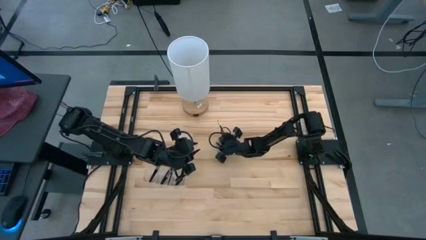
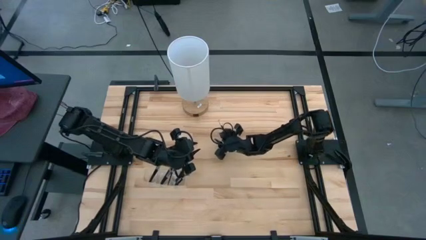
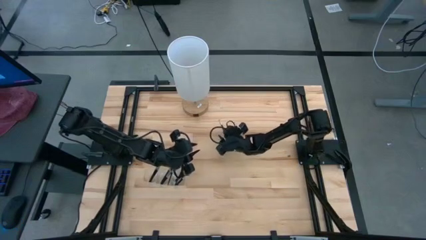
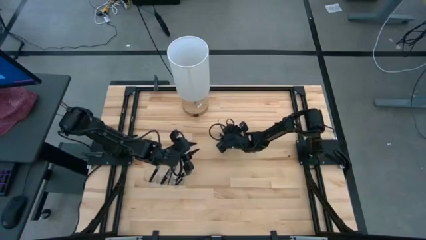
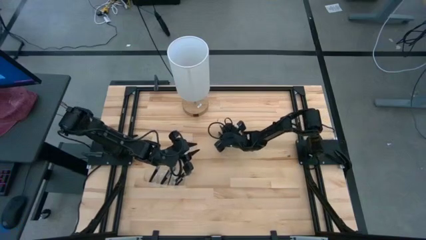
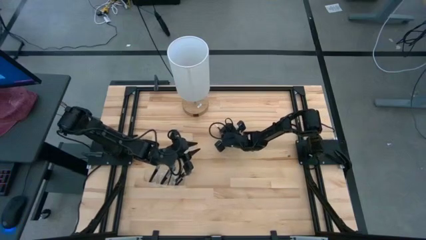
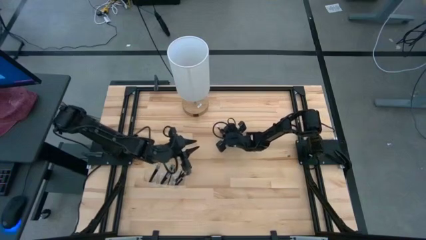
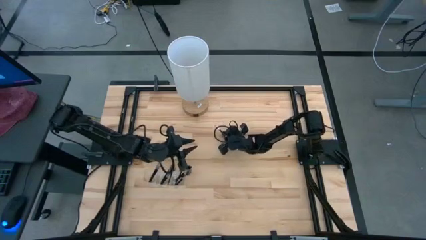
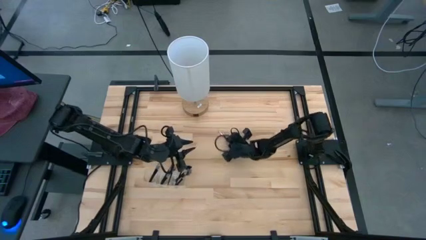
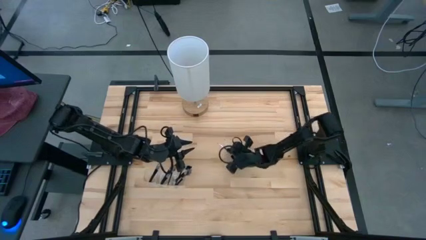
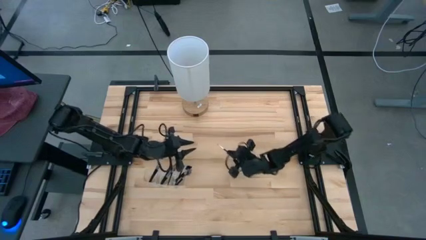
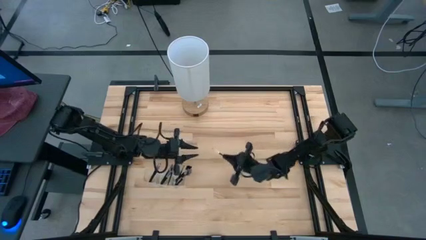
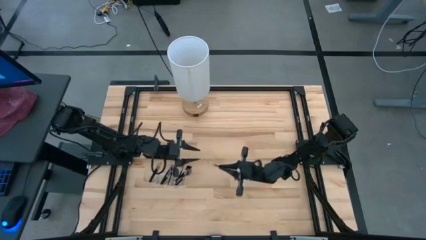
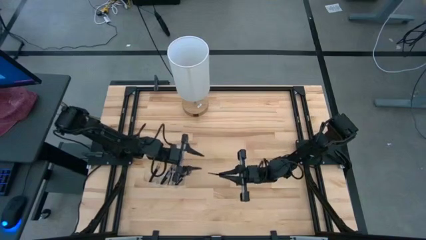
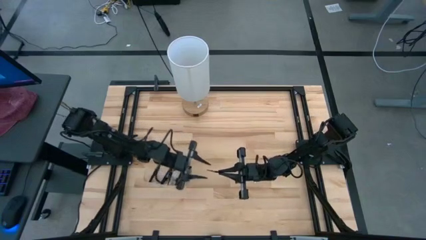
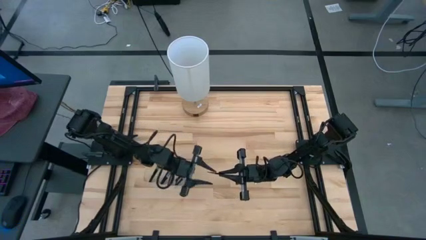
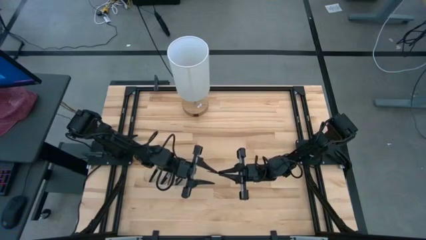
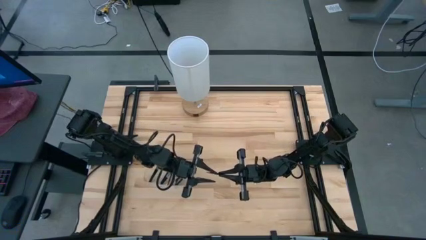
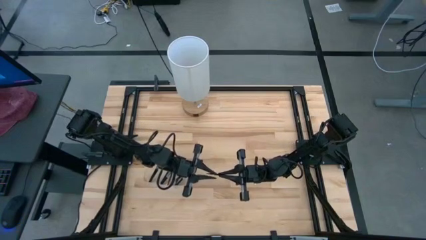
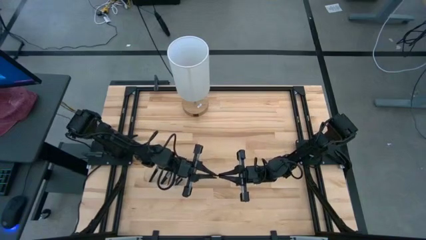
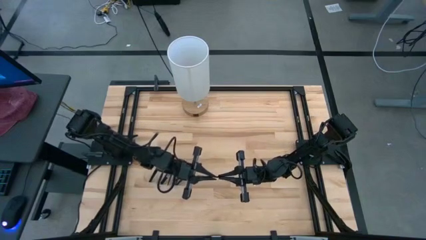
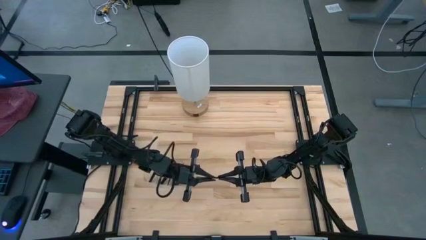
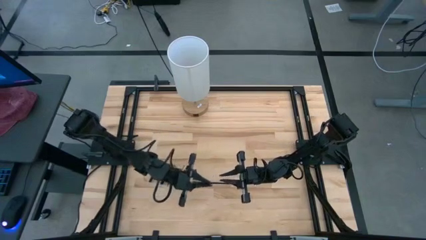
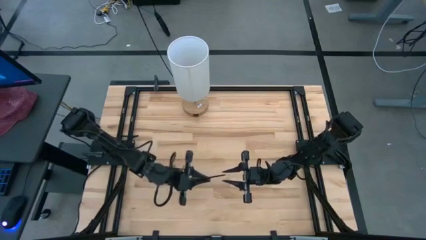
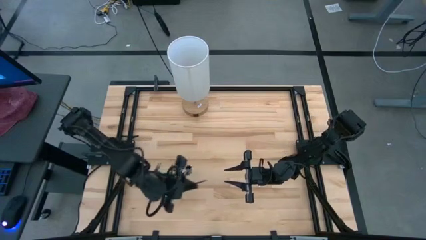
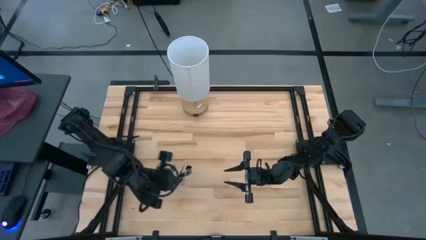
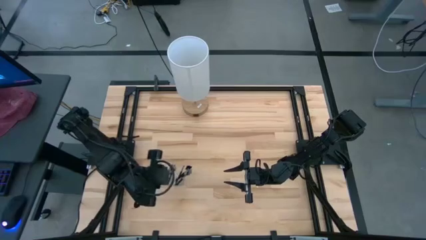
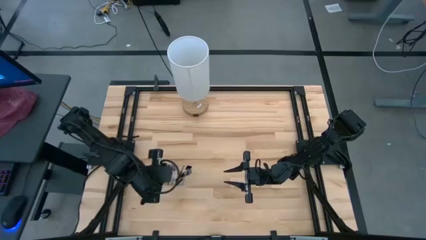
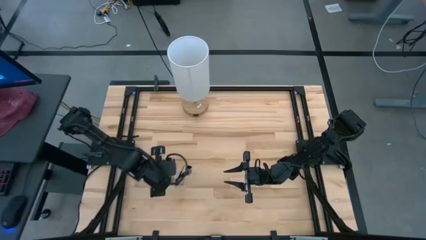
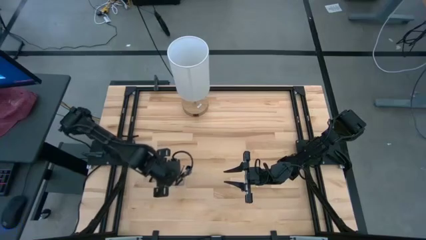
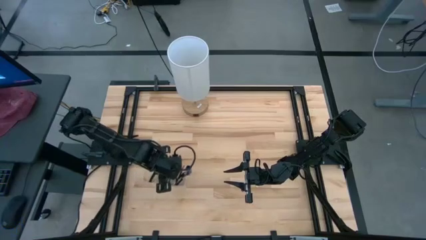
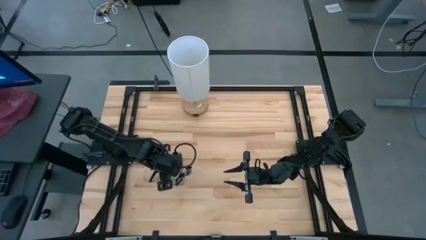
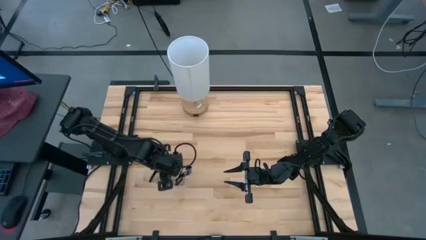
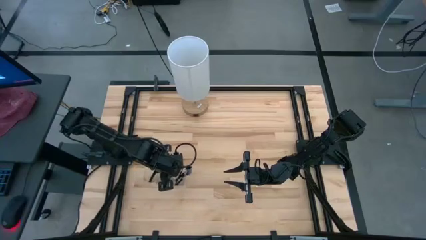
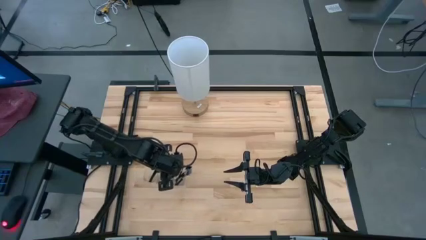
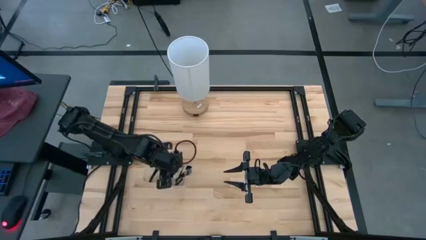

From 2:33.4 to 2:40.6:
Task: Put items in baskets/containers
Put the eyeshadow brush in the transparent organizer

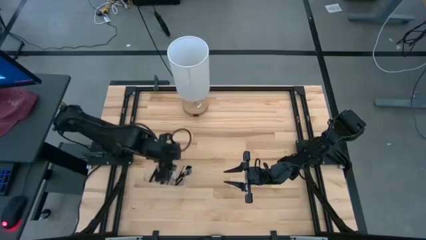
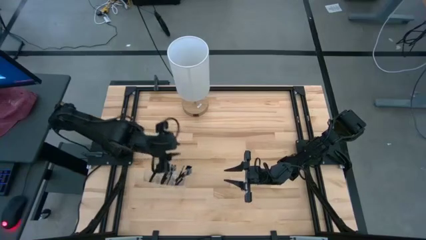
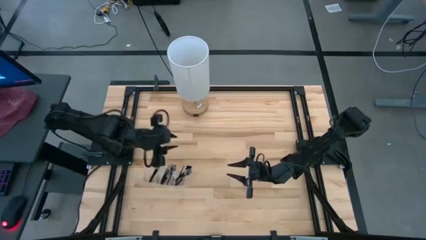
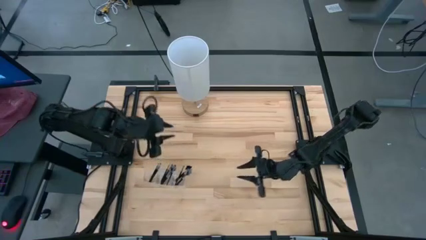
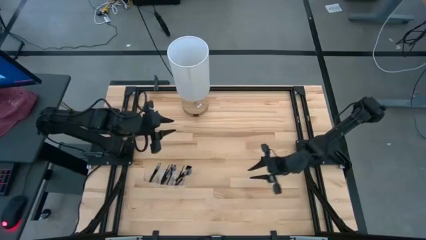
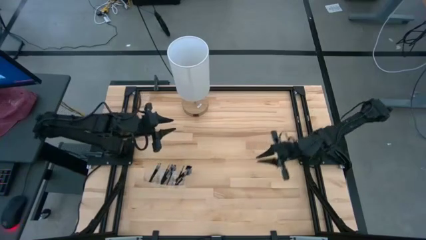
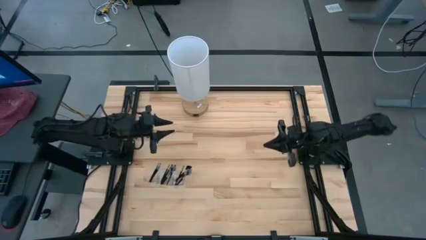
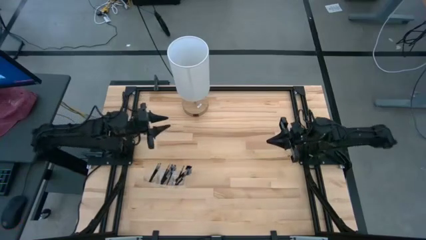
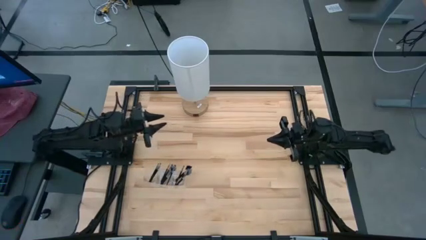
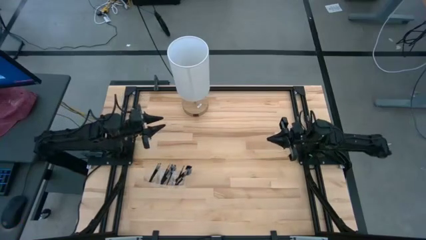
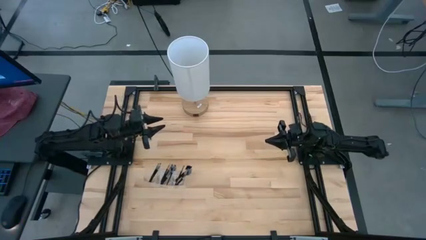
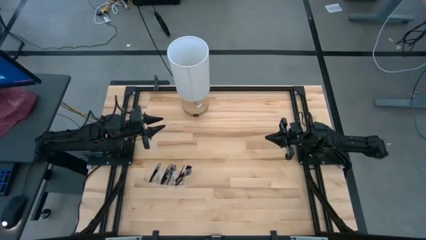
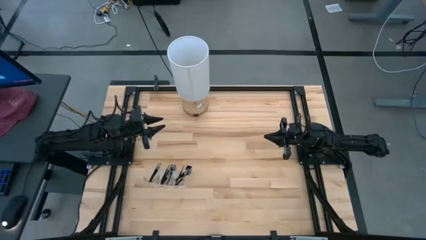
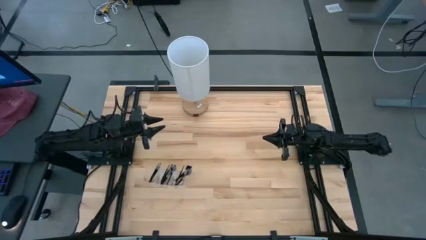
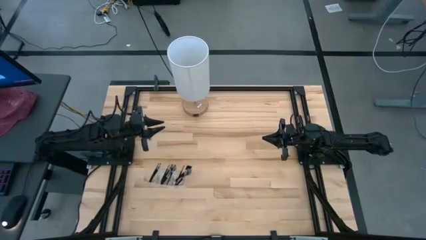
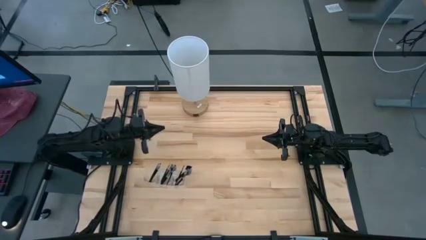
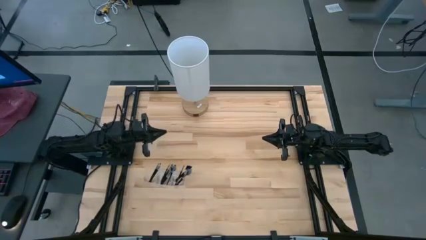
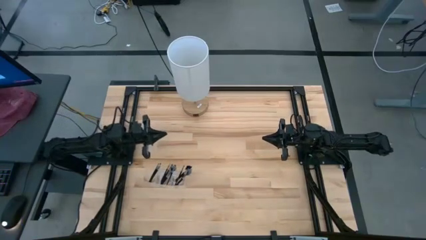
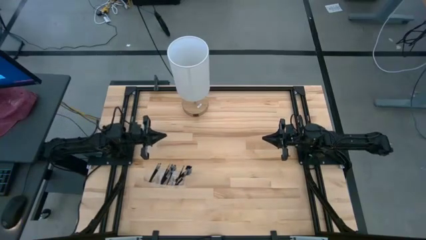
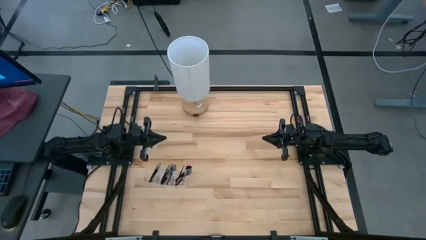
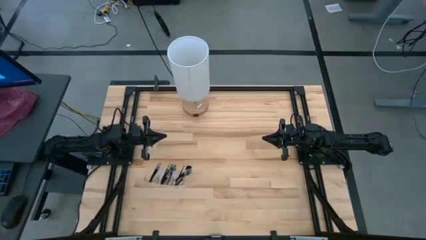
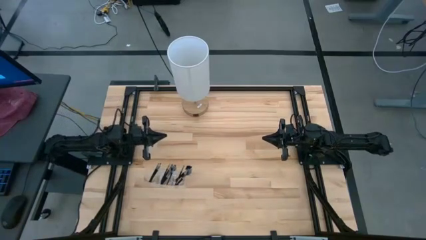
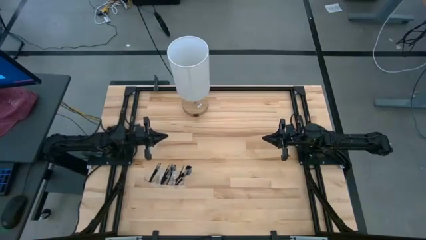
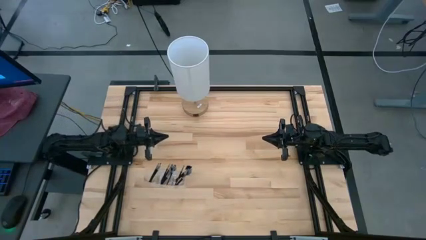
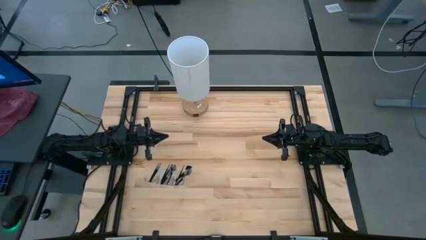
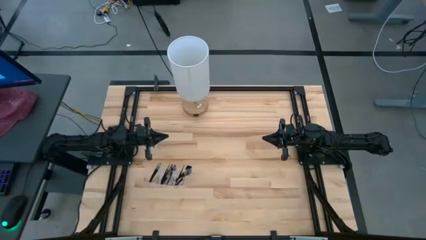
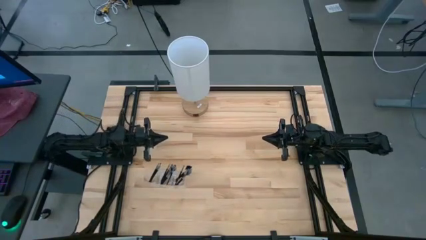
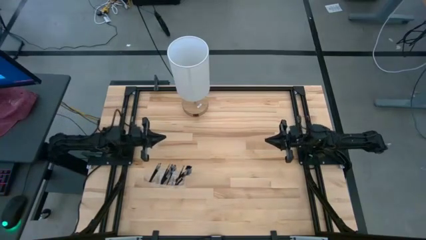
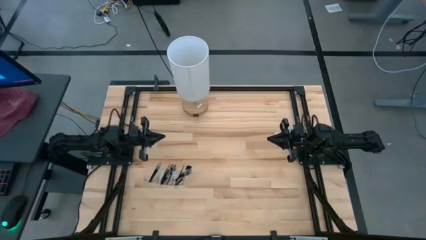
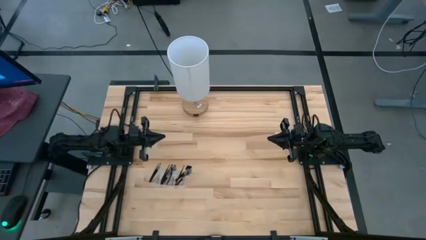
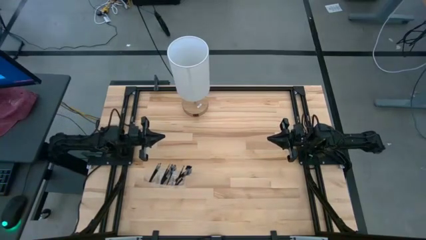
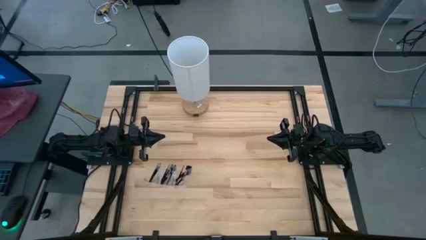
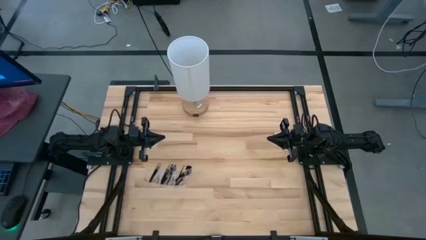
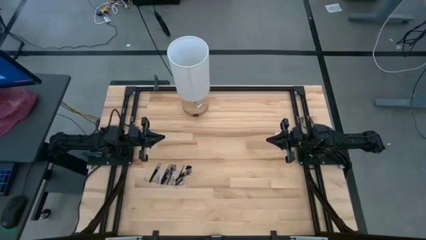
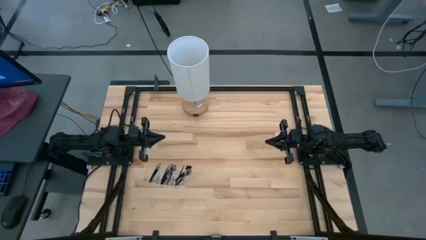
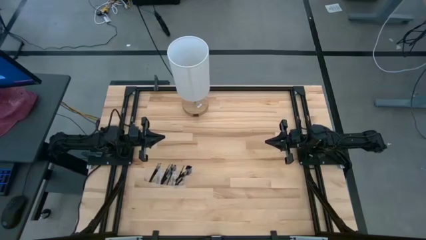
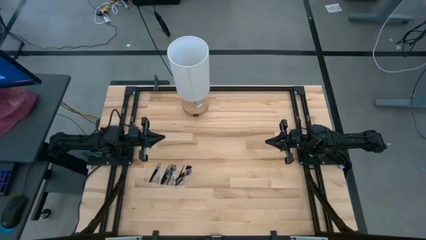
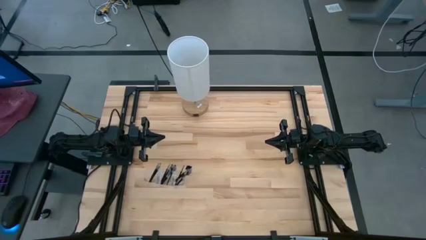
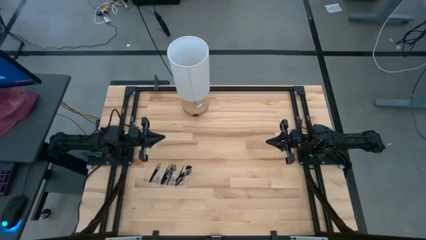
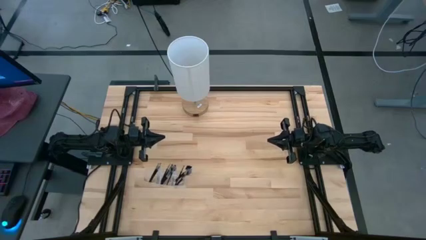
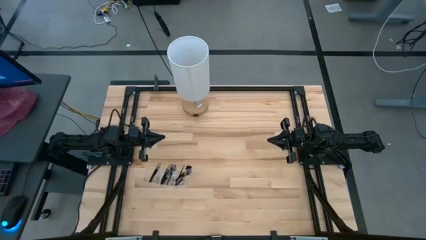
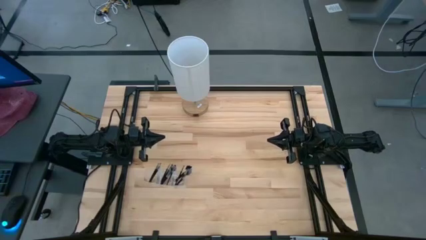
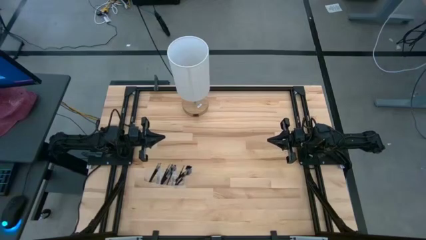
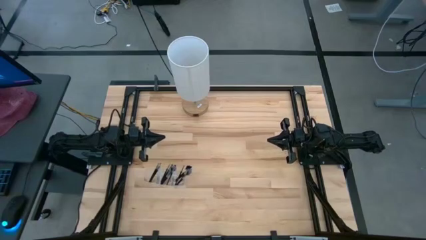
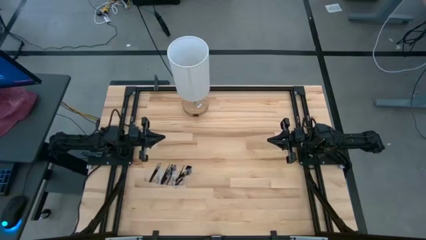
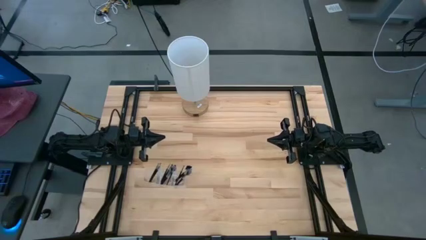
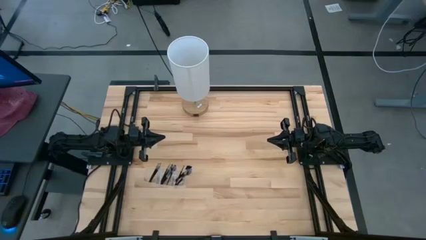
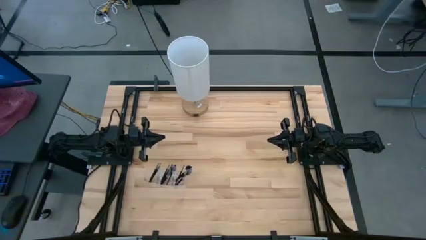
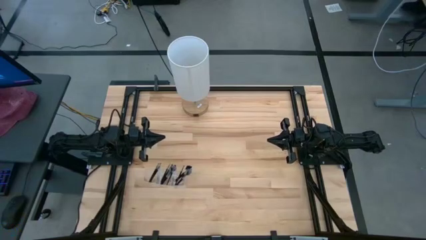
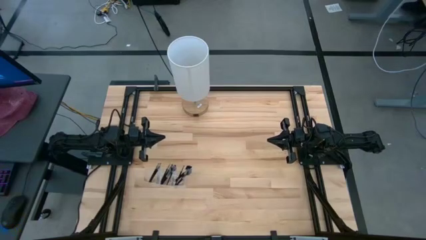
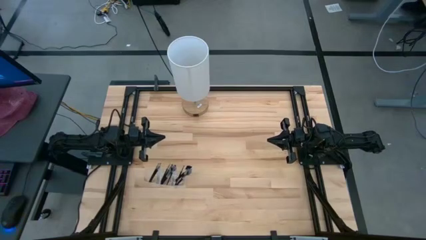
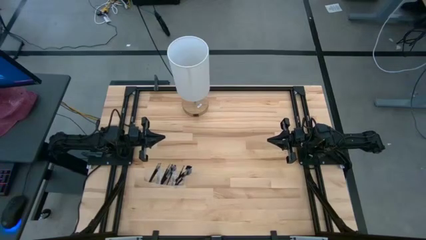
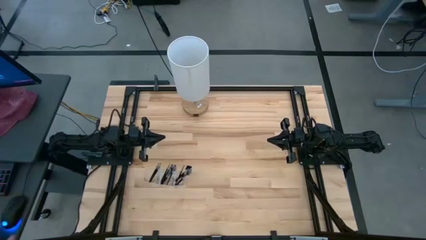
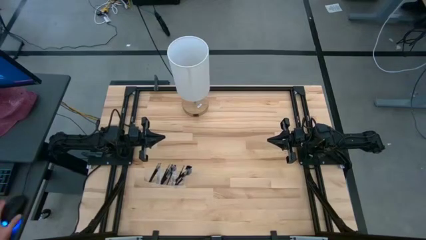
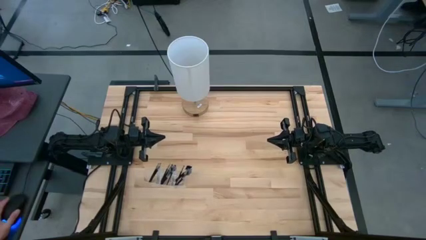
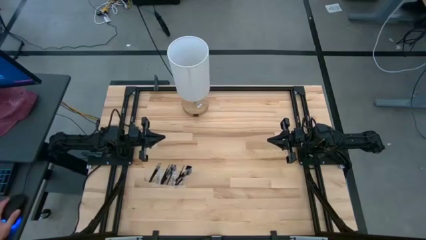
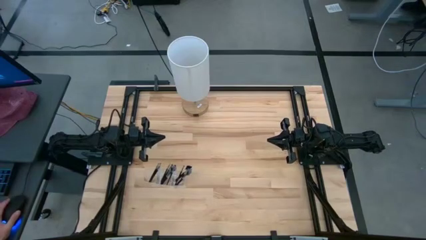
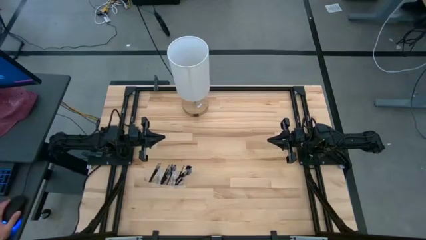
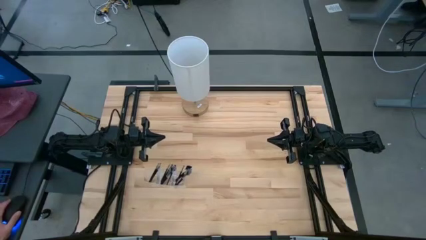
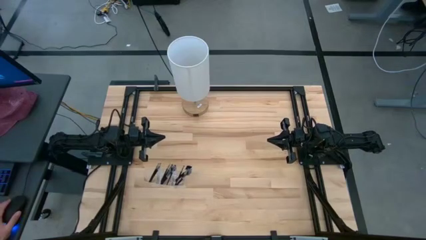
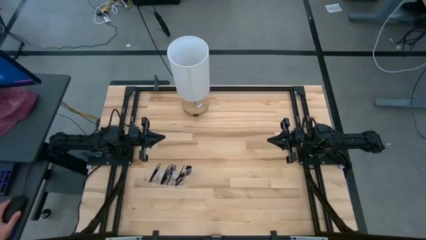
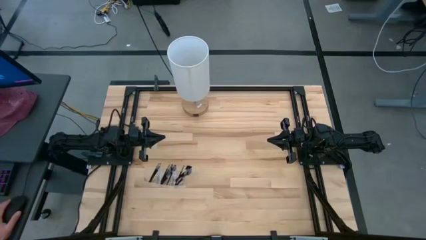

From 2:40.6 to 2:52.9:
Return to Home Position
